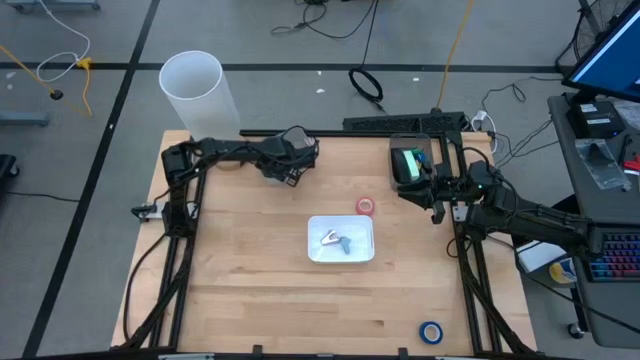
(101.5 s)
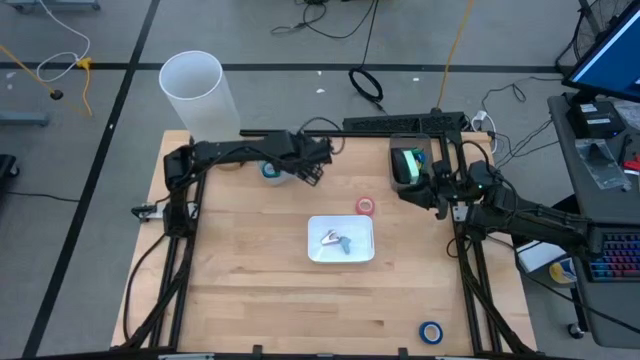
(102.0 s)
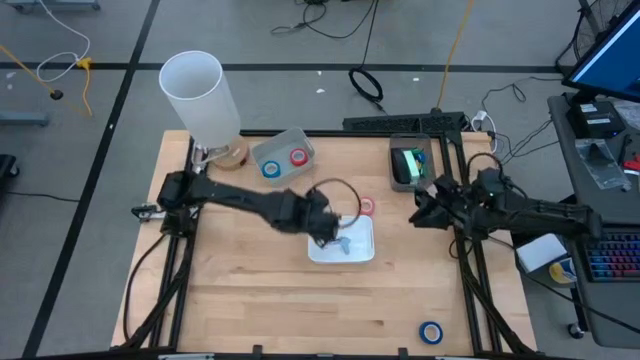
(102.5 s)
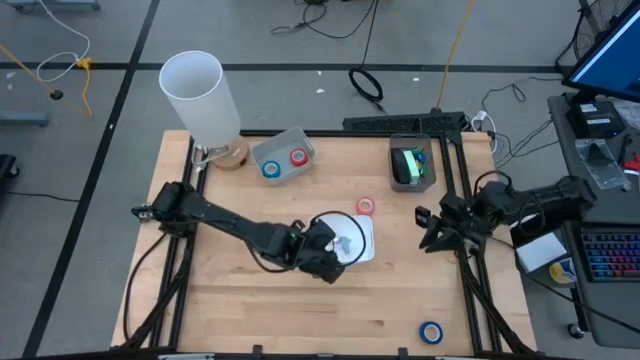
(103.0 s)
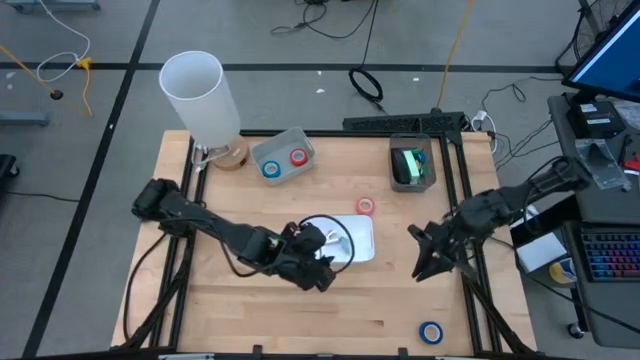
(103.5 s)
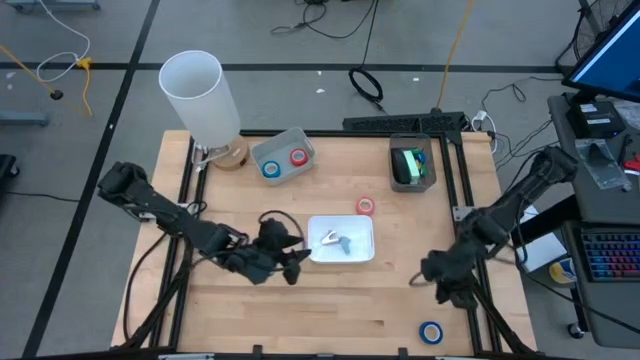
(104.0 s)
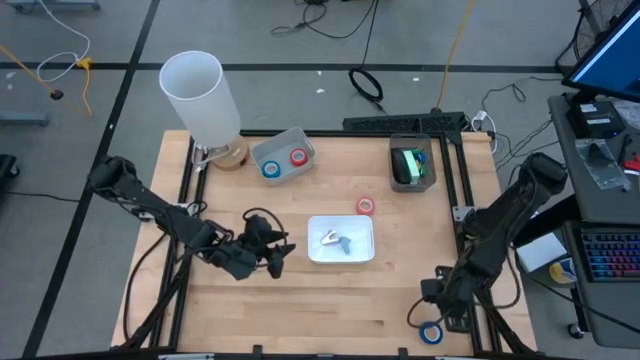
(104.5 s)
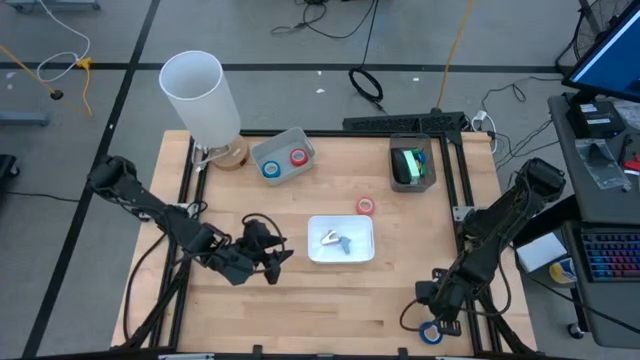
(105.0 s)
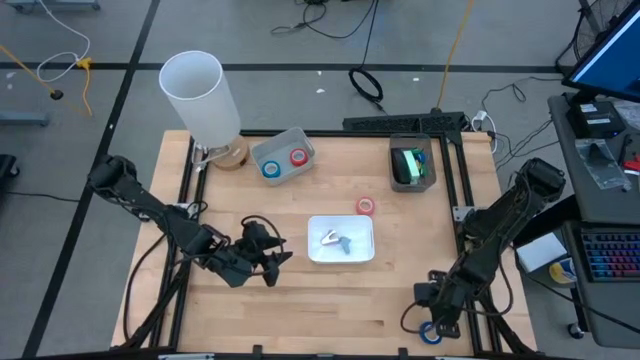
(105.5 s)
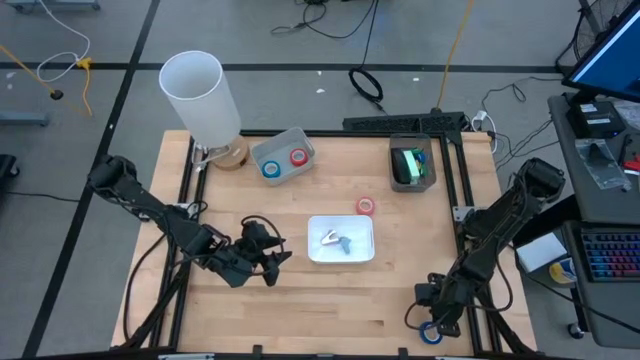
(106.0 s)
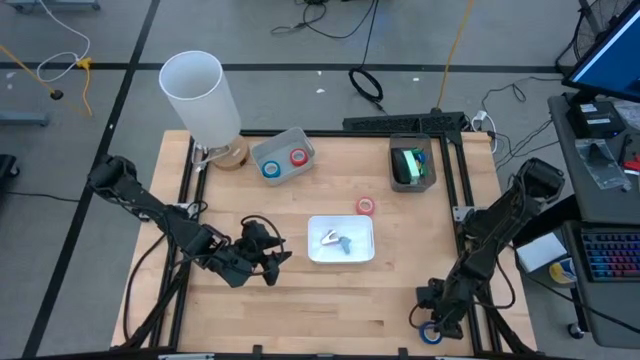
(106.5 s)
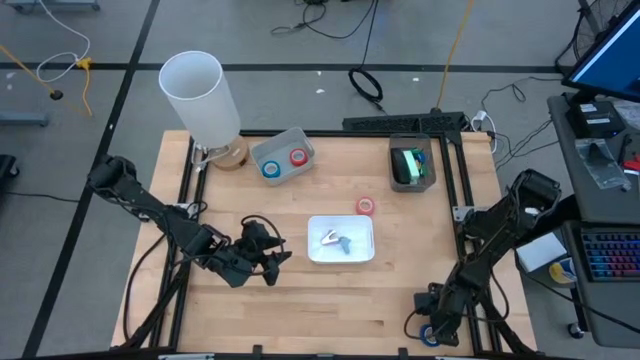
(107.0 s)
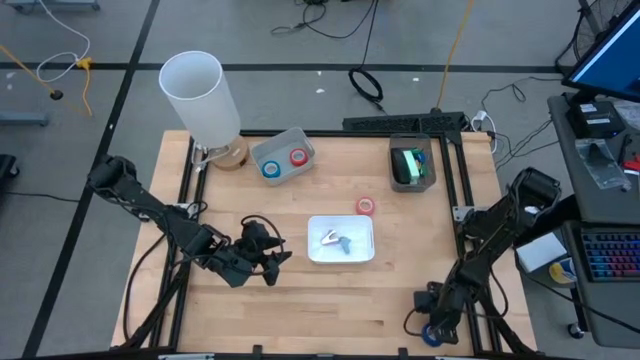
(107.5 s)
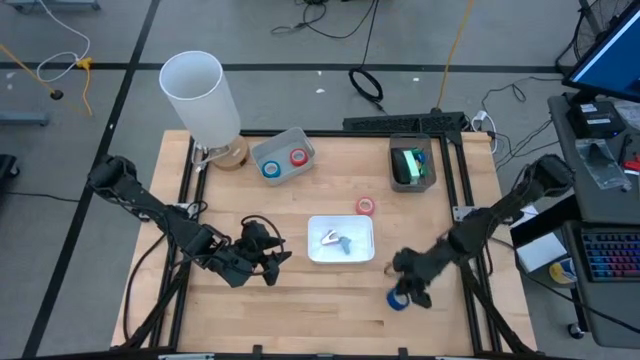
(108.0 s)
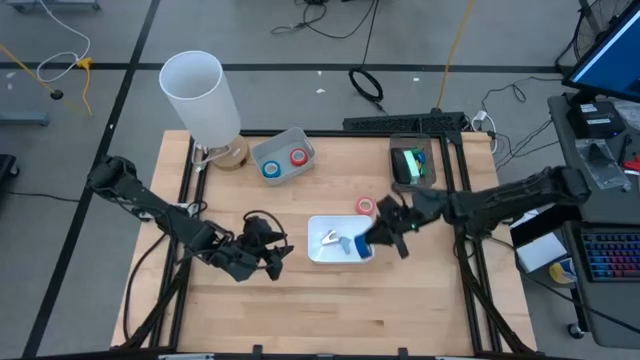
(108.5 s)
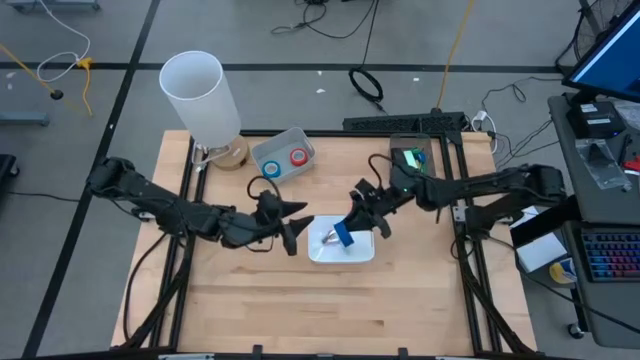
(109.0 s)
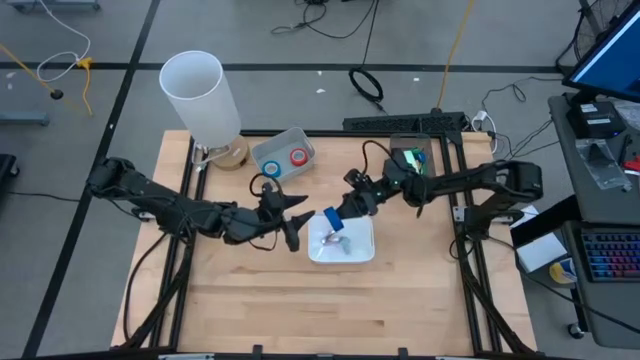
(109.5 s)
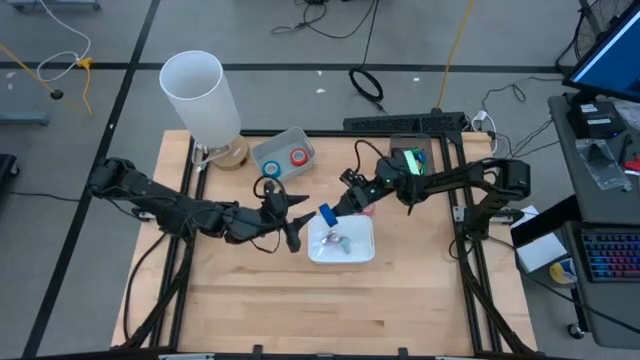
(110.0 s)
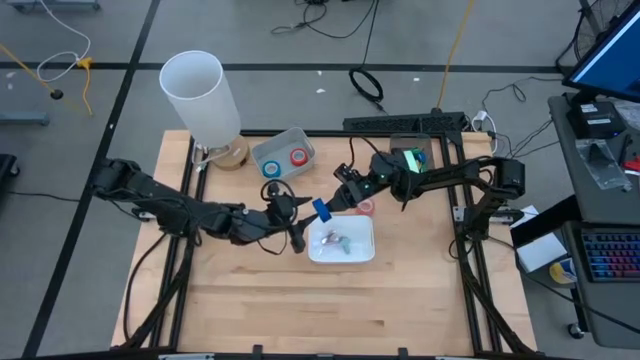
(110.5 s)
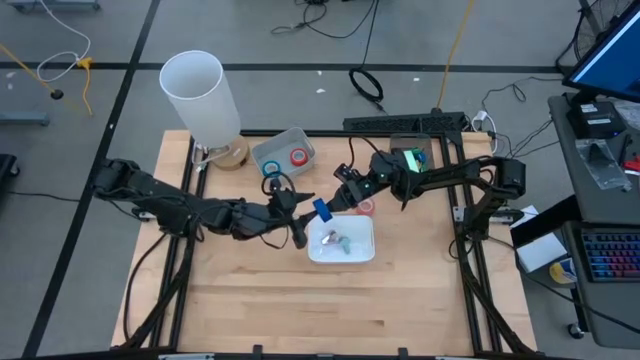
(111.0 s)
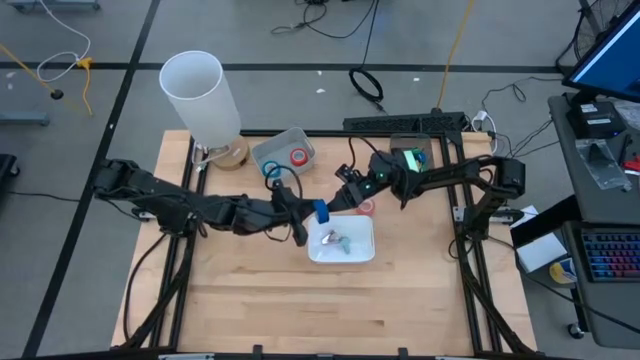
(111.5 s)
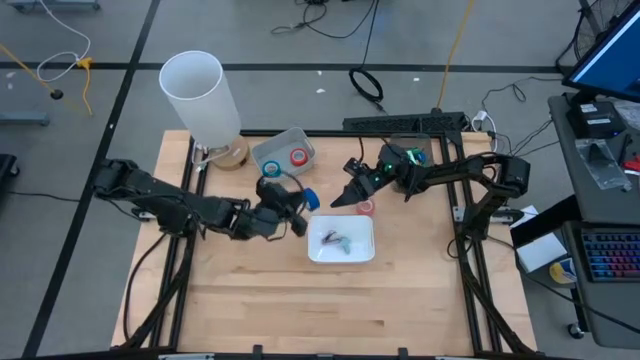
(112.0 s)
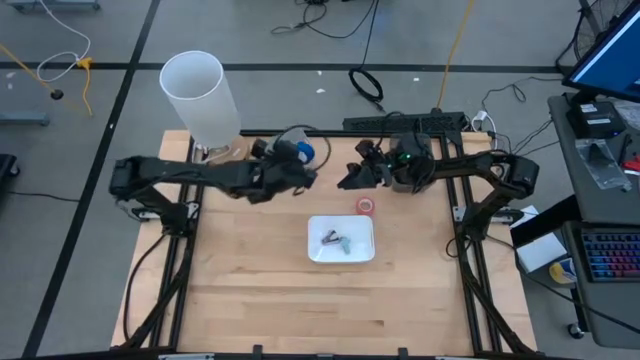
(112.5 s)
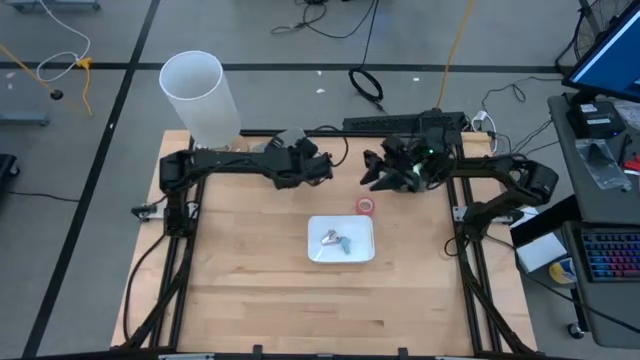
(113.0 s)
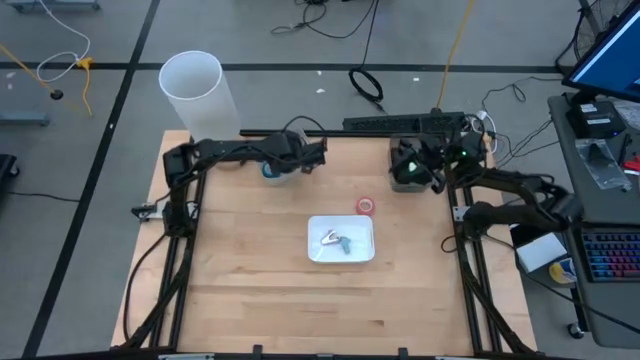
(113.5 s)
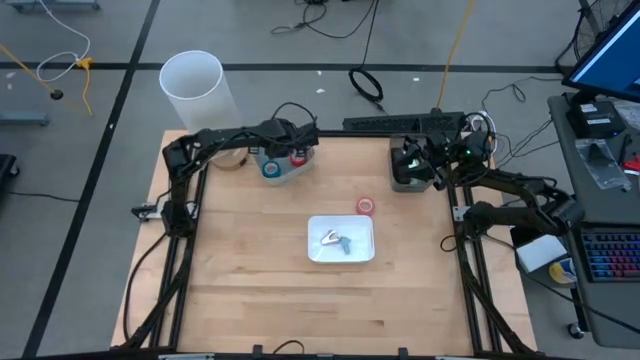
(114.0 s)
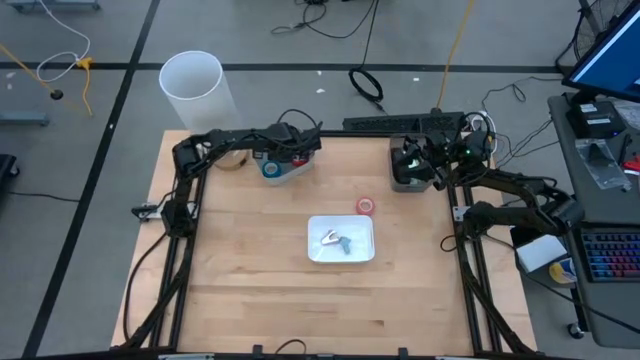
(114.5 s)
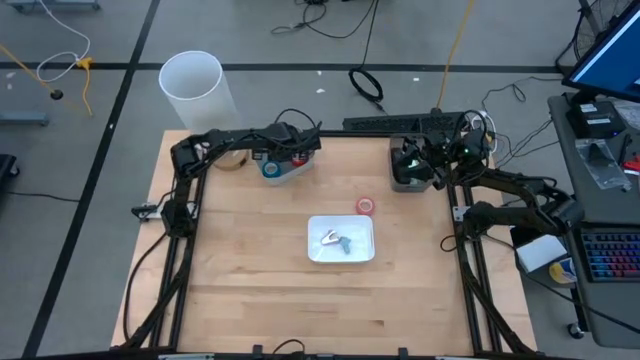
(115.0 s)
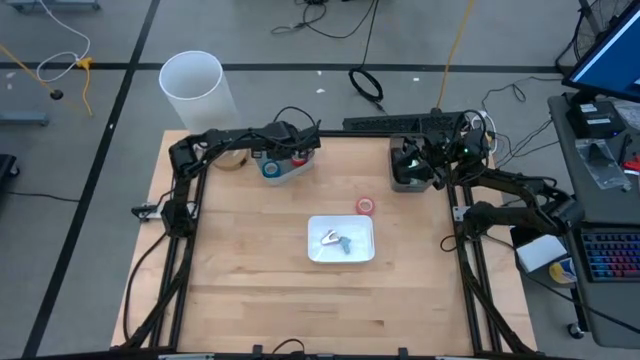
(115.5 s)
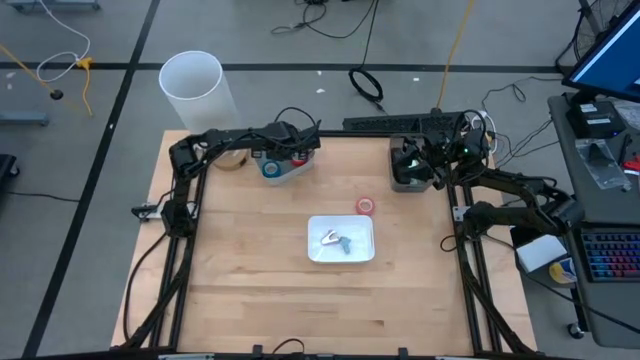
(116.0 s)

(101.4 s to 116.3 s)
Task: Pick and place Stapler, Stapler remover, tape
Put the blue tape into the gray bin

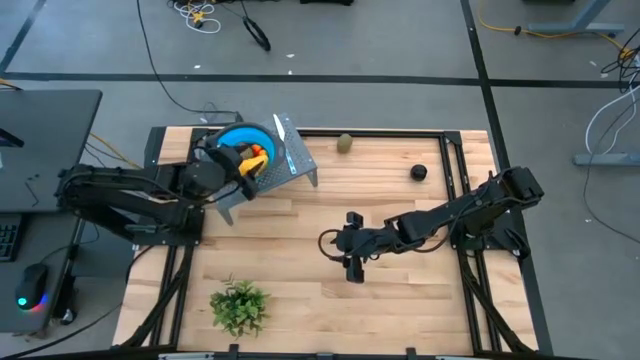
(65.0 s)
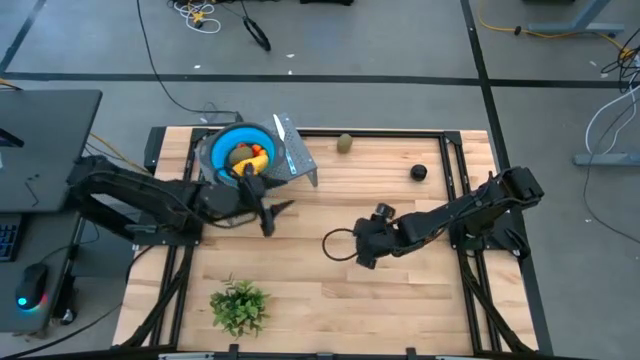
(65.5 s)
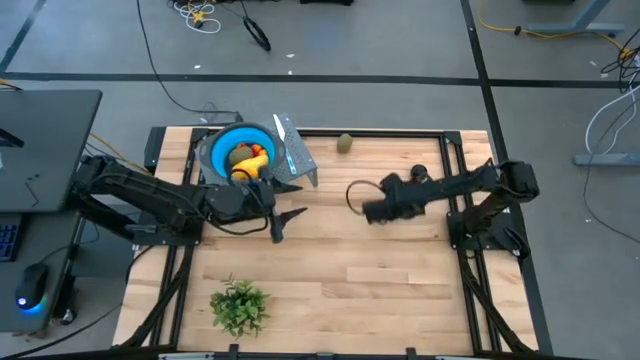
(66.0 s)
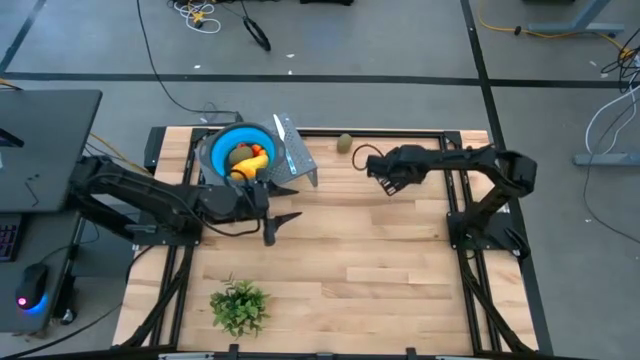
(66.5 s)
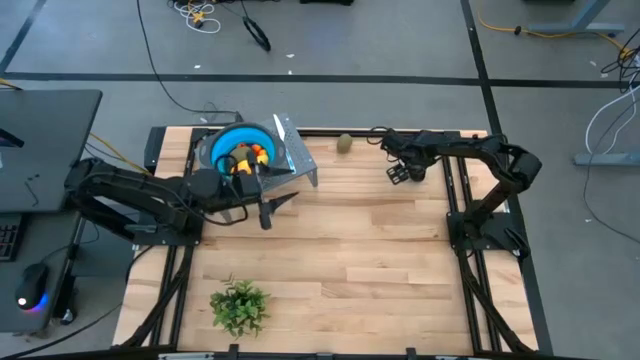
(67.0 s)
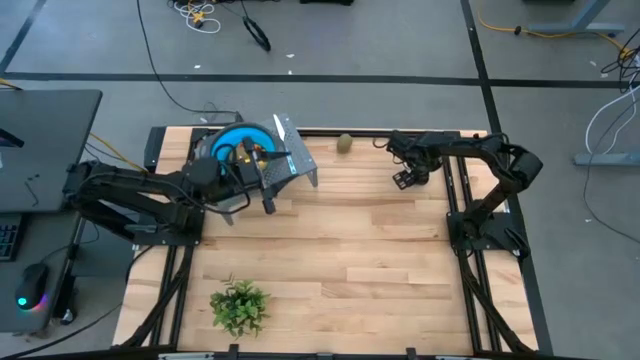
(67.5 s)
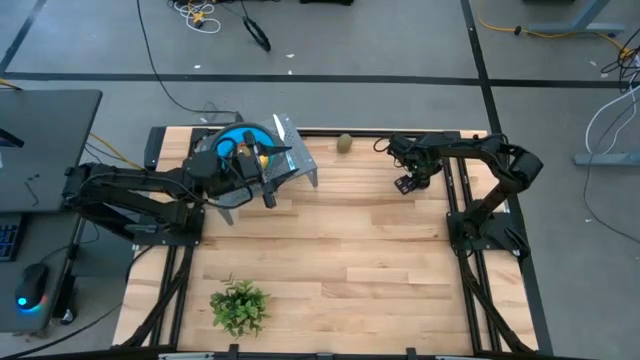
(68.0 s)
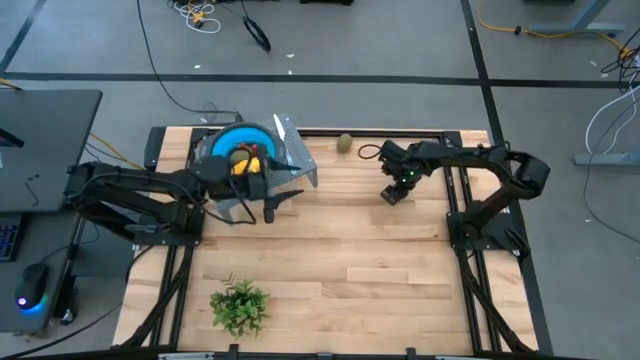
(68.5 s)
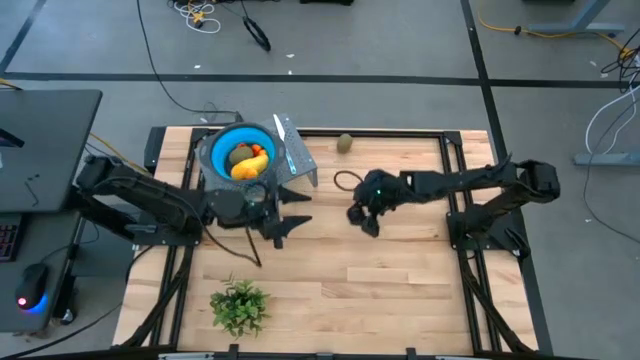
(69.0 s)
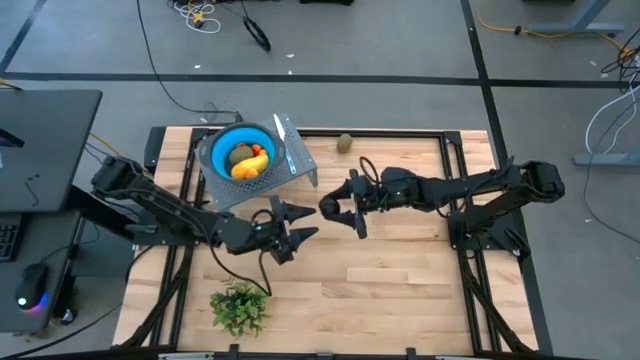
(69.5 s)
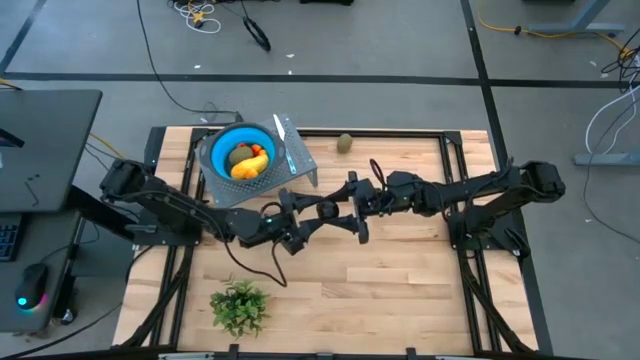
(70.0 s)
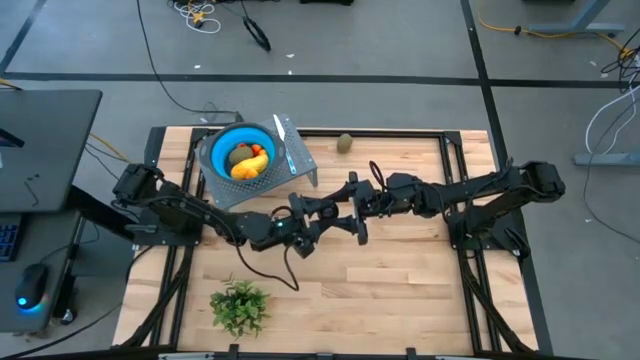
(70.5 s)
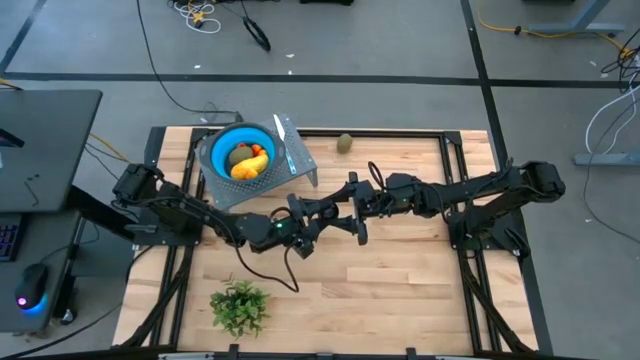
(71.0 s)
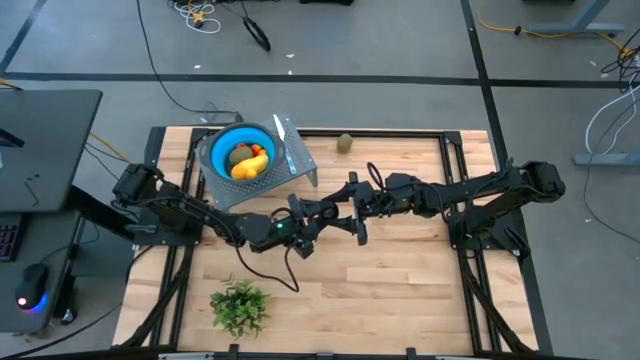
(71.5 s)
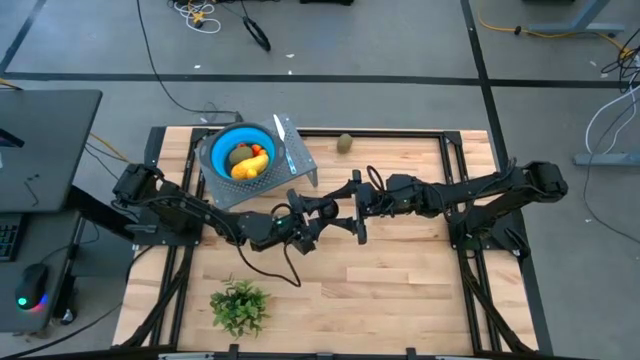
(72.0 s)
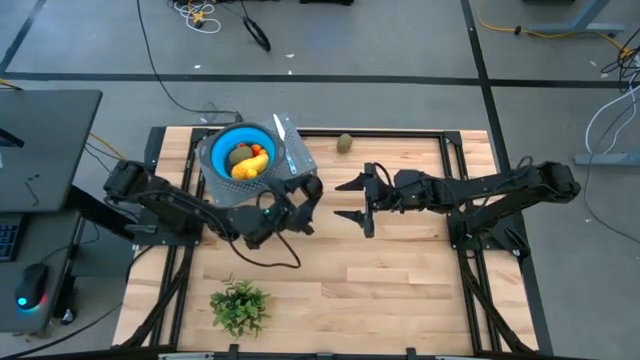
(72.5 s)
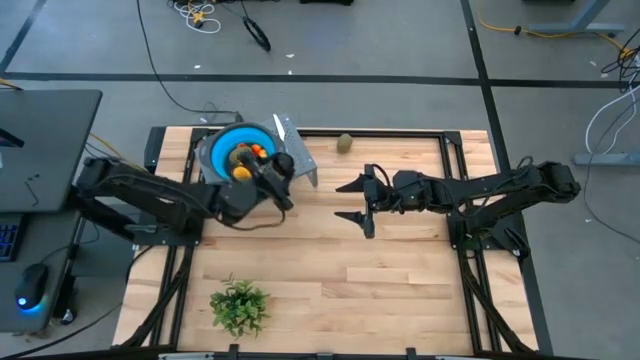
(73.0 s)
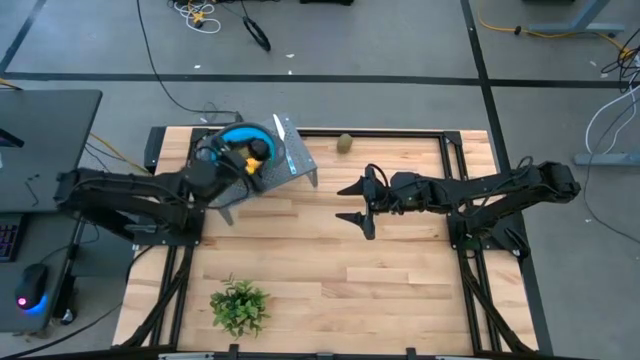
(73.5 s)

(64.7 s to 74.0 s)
Task: Pick & Place Fruit
Put the black plum into the blue strainer bowl on the shelf
